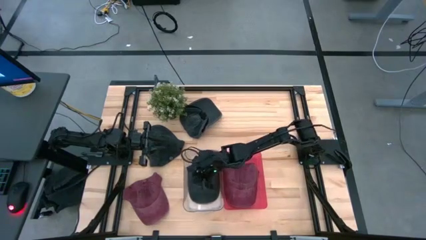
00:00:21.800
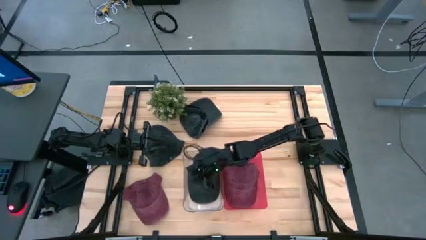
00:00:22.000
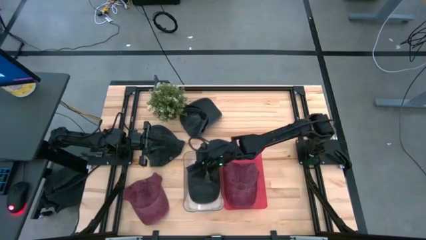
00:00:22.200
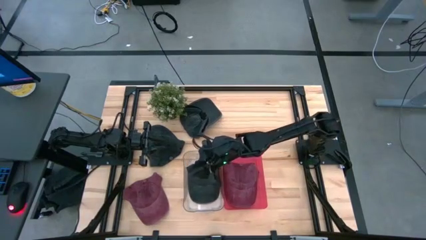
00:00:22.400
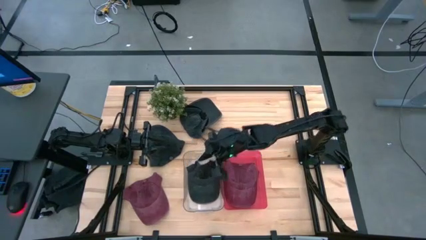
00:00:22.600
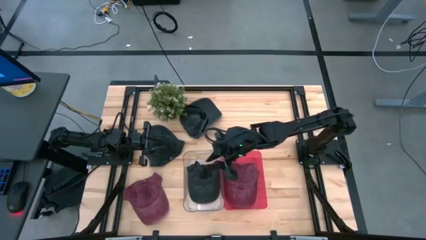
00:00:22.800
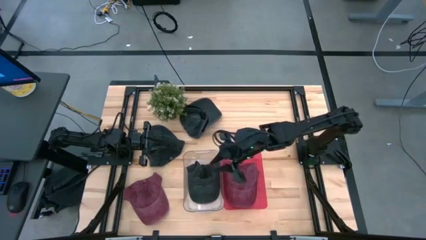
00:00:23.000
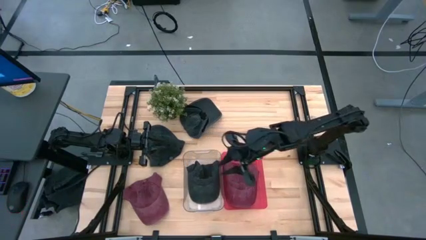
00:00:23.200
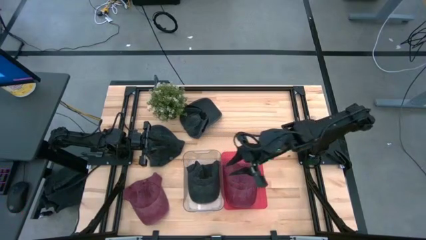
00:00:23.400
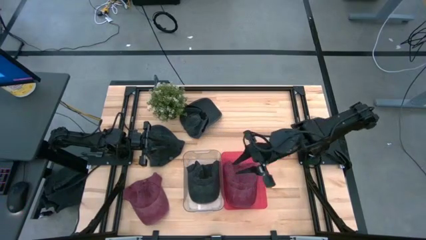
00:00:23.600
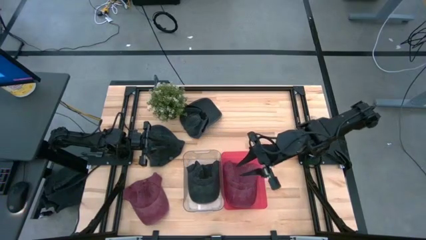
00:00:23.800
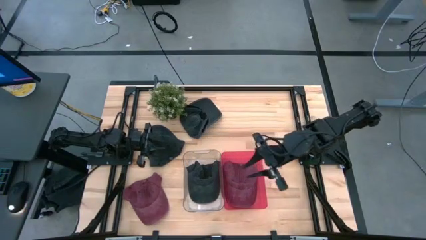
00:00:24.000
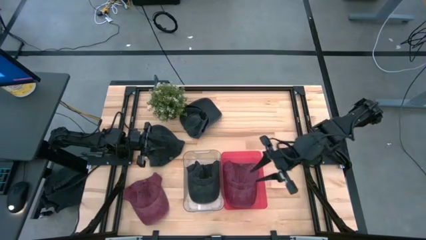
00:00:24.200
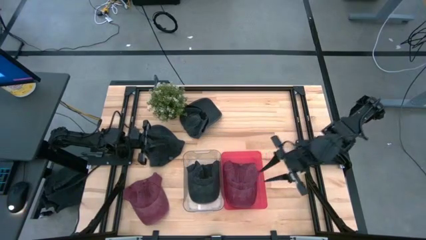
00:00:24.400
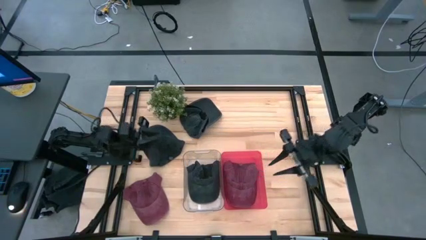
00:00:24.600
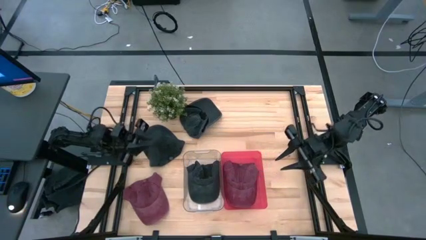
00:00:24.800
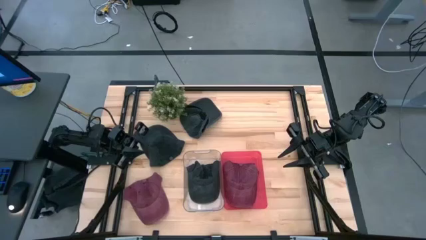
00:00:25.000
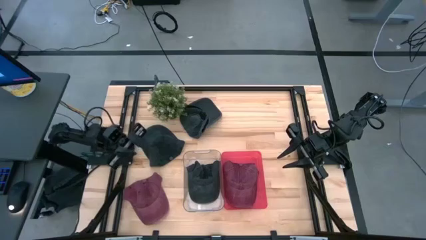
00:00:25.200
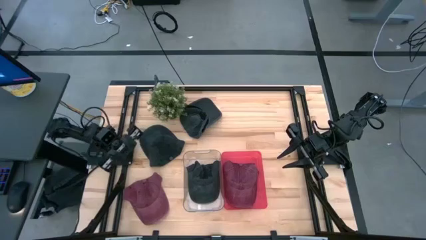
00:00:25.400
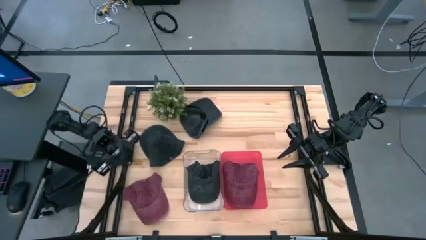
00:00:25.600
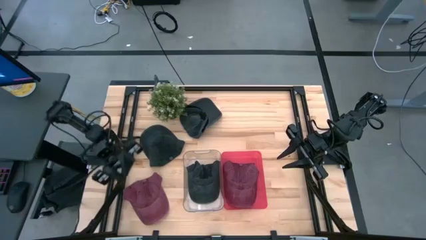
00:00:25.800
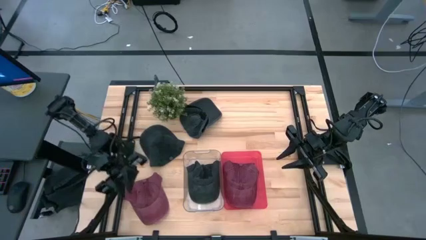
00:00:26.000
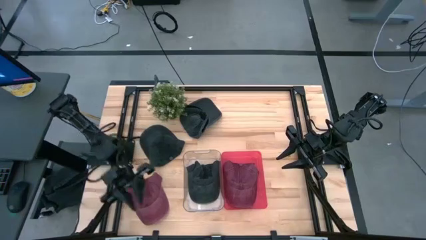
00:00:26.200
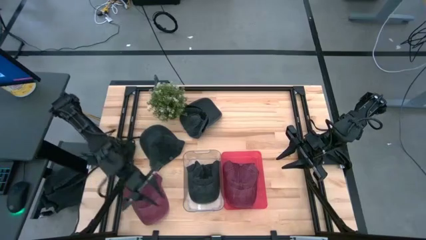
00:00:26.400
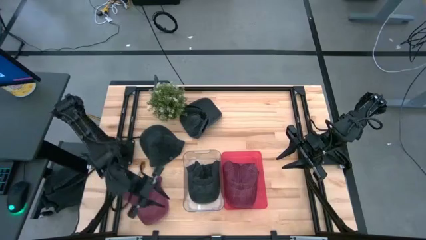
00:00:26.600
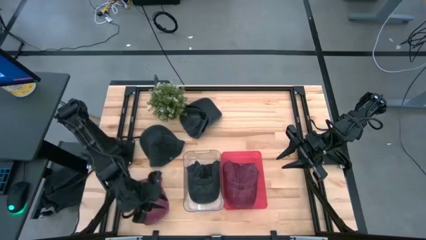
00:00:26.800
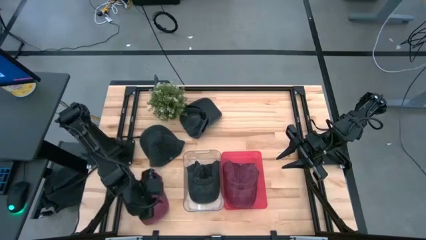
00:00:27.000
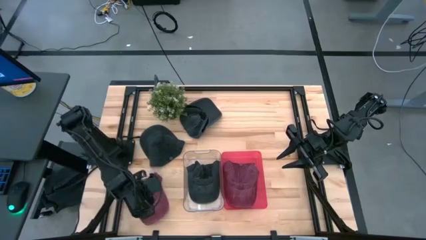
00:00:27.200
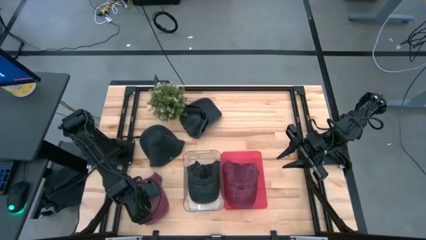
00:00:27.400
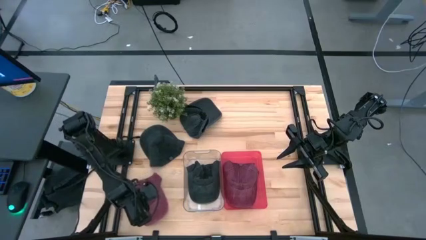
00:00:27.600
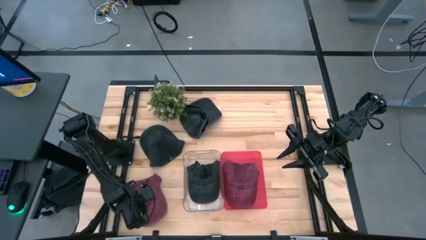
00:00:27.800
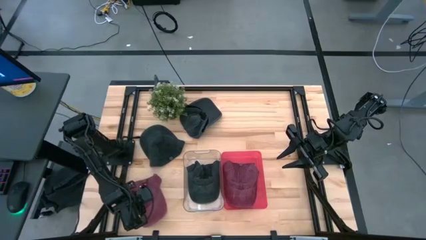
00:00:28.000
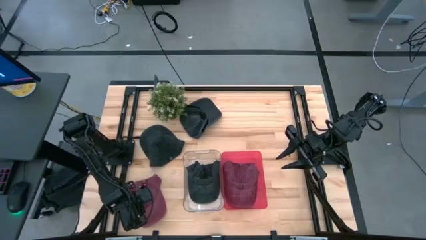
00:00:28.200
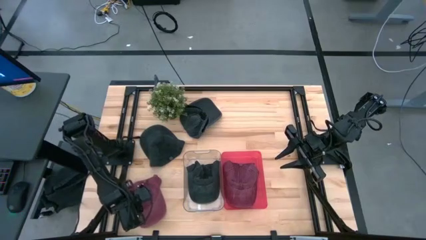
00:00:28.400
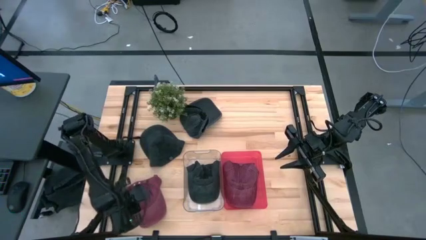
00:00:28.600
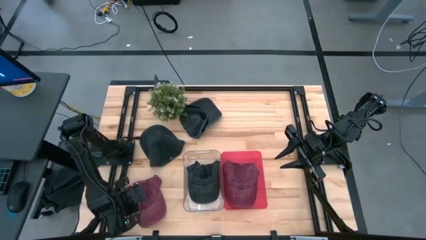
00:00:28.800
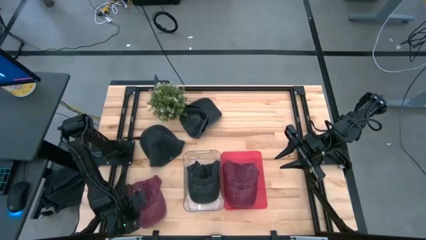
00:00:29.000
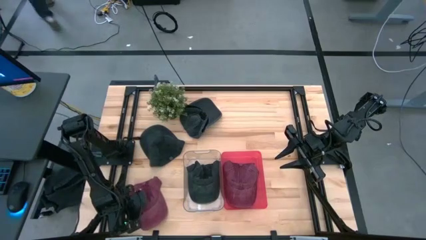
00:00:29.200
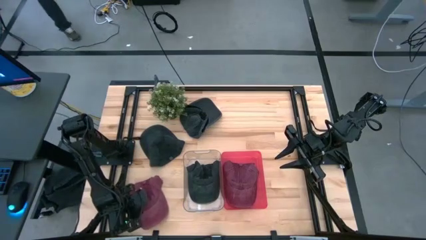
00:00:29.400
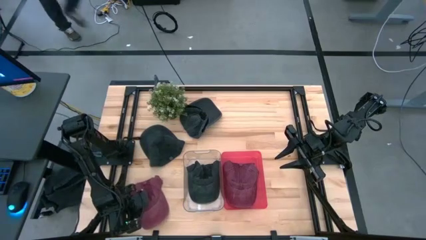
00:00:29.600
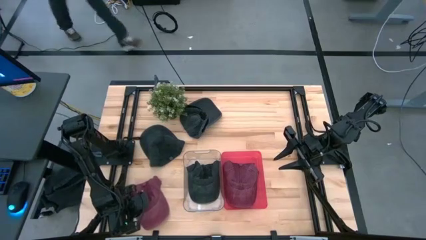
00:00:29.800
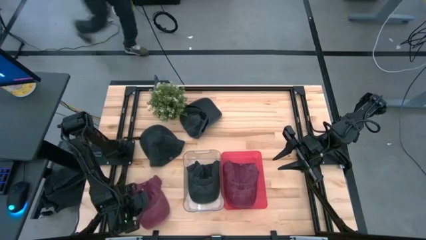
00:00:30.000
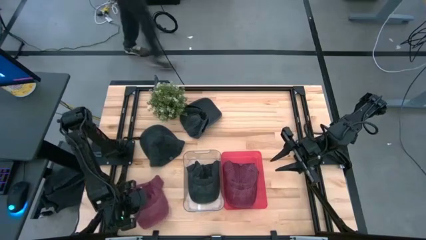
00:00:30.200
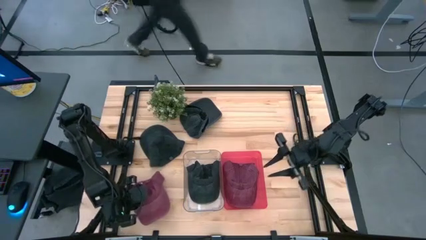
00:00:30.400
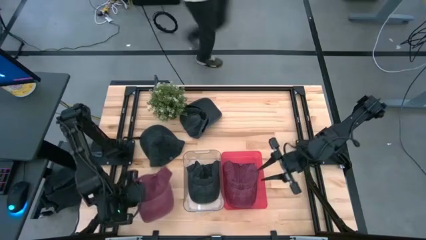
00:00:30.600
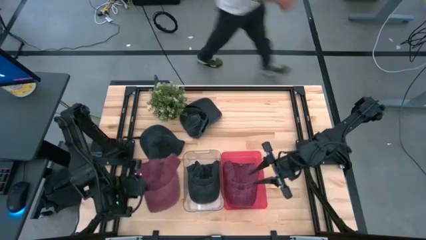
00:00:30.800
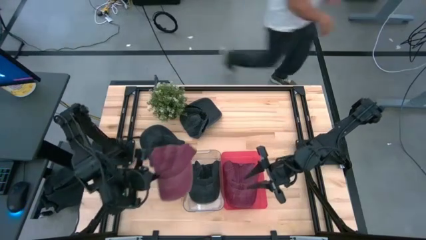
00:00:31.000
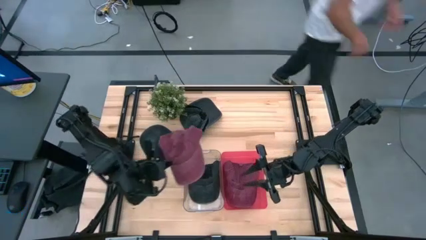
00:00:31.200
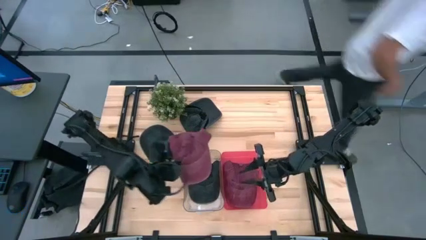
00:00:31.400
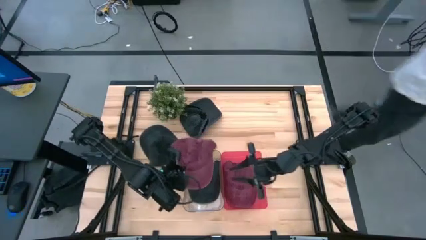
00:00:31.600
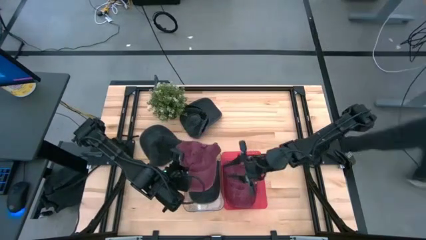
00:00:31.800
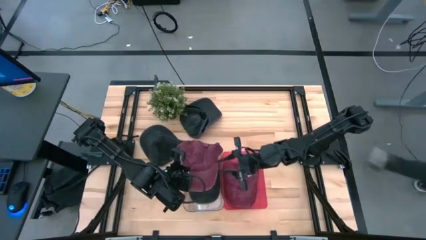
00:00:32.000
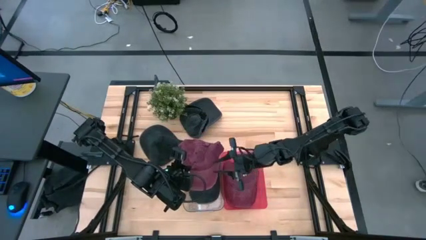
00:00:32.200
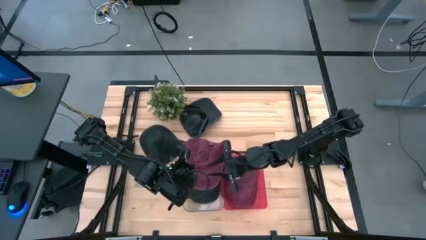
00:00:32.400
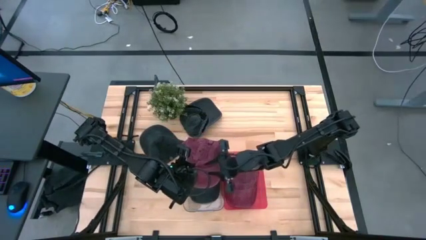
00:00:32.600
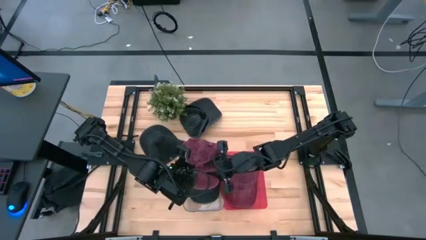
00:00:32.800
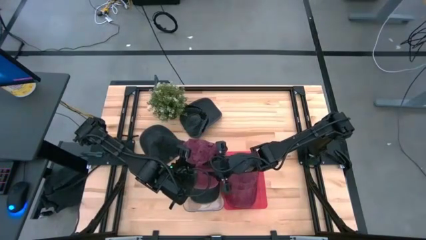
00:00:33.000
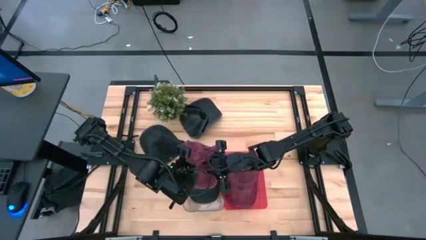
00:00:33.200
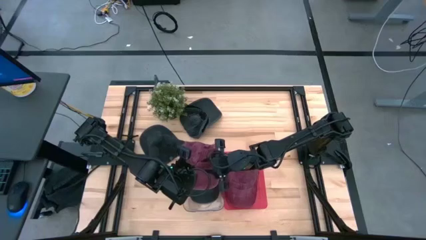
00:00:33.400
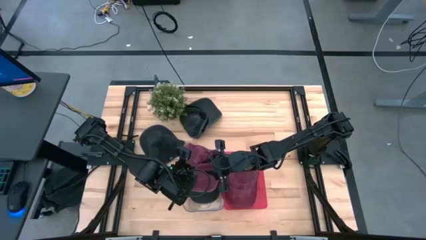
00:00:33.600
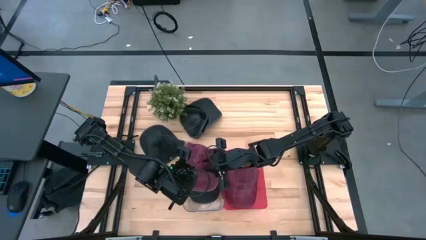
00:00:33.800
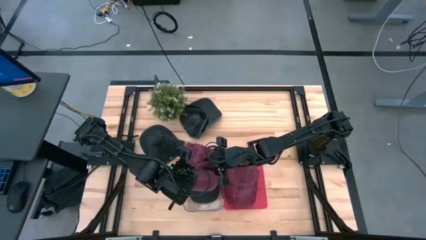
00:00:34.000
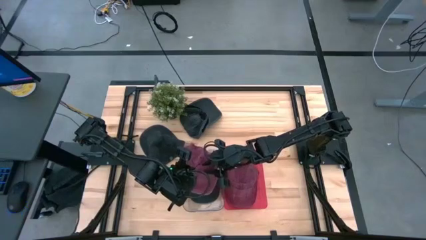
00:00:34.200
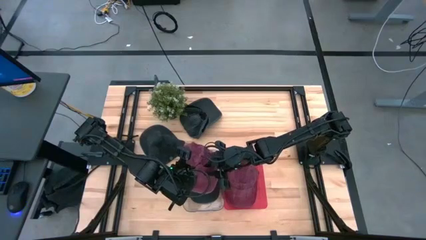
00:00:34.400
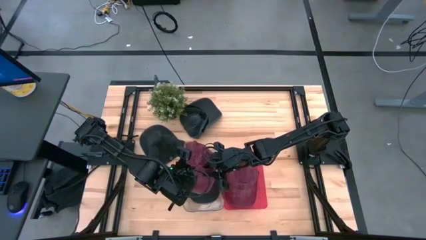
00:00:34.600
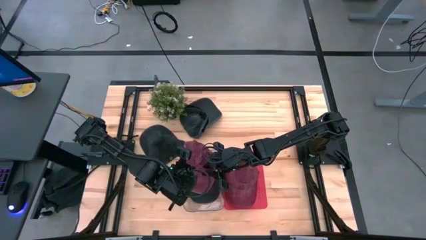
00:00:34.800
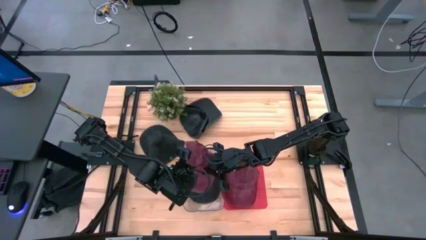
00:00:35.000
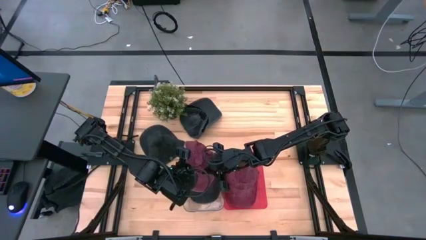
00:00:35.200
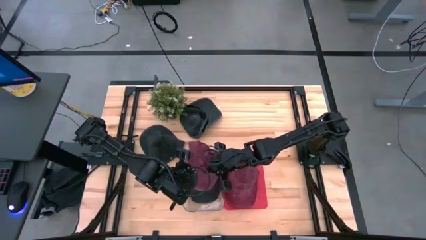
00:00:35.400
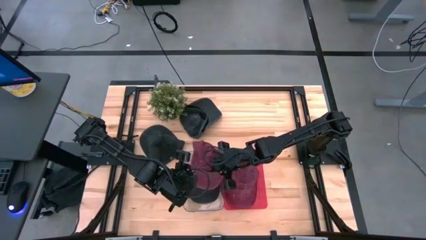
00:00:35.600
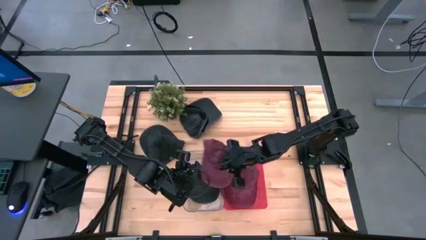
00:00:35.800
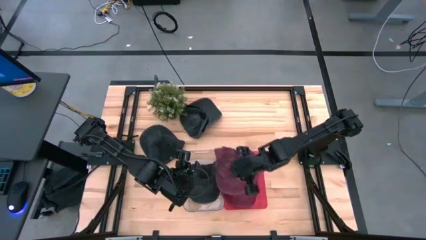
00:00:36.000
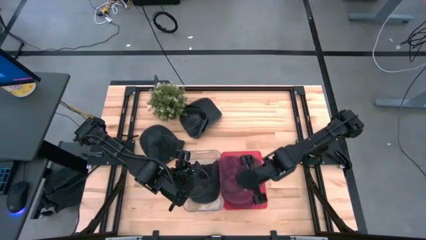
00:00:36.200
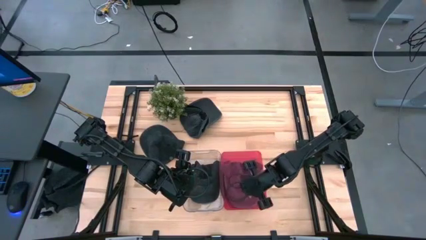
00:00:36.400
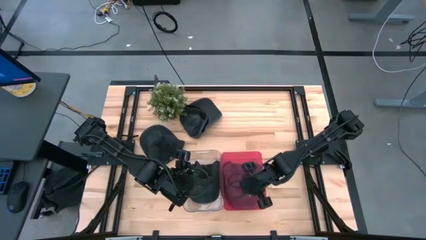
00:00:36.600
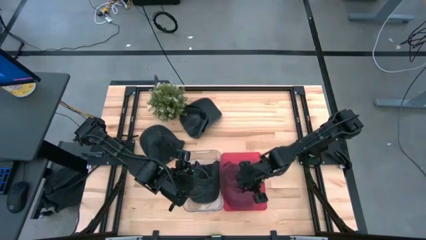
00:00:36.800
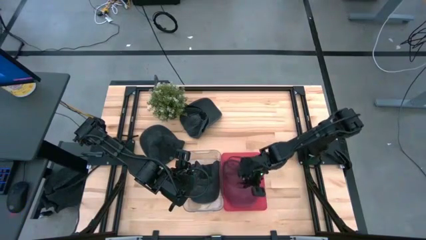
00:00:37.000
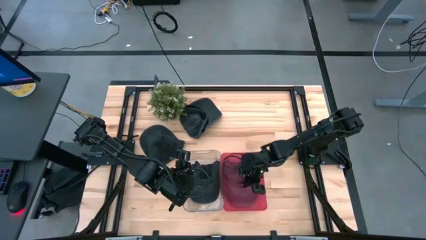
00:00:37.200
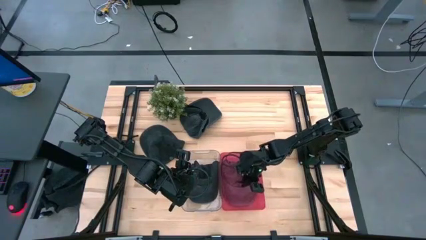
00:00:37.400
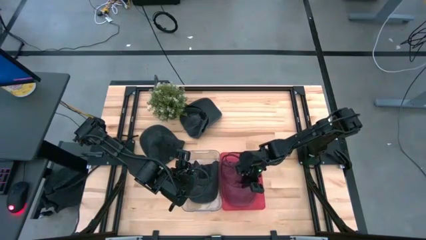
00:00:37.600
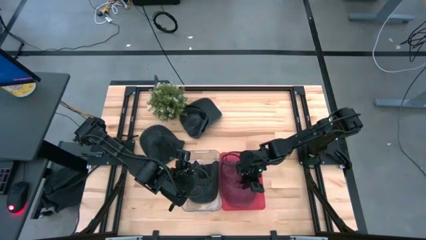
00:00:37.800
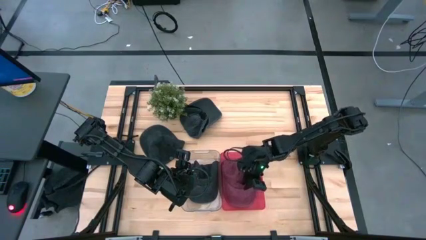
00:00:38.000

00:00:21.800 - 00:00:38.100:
Task: Pick & Place hat
Put the red cap into the red bin
